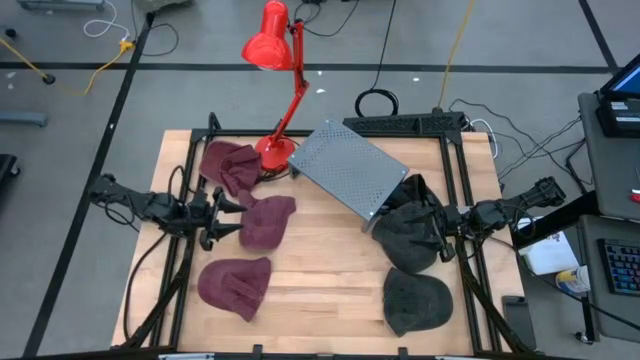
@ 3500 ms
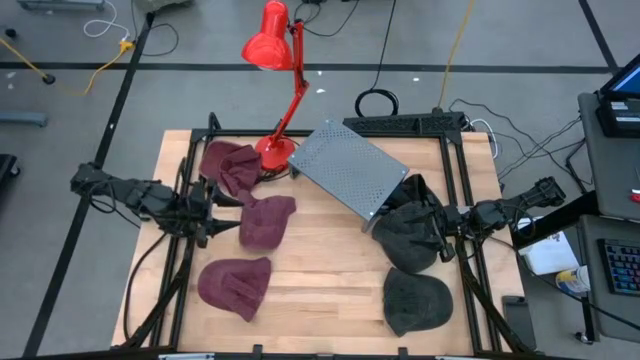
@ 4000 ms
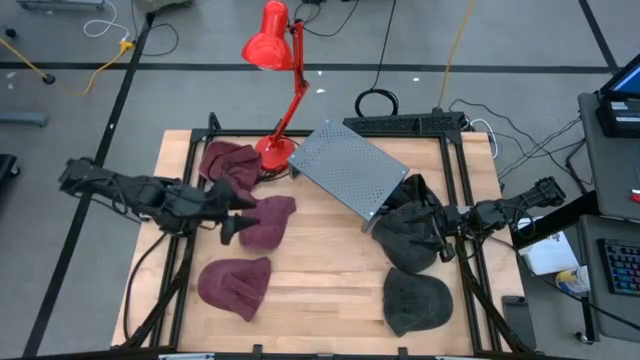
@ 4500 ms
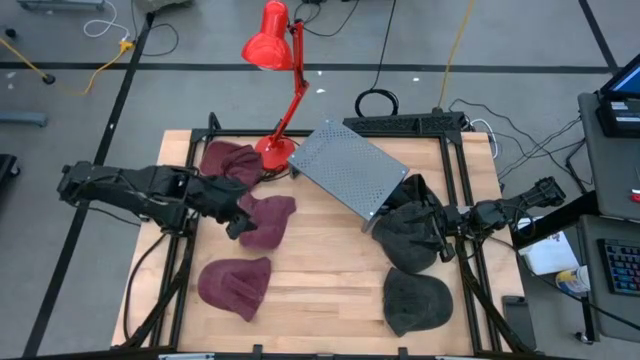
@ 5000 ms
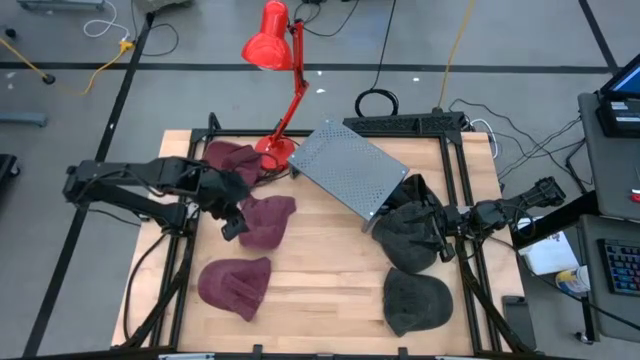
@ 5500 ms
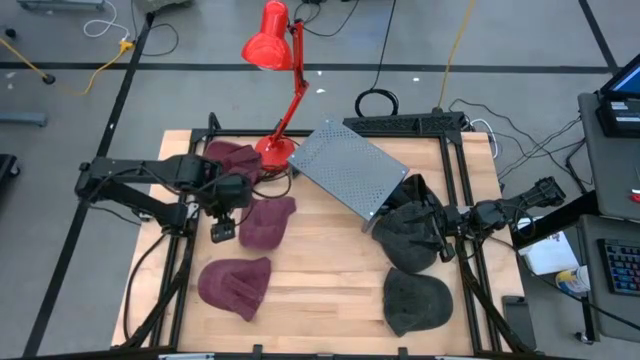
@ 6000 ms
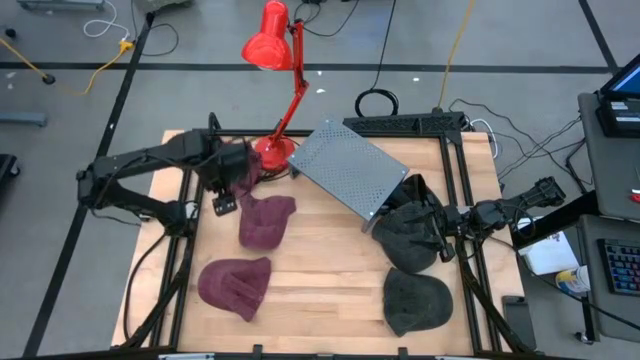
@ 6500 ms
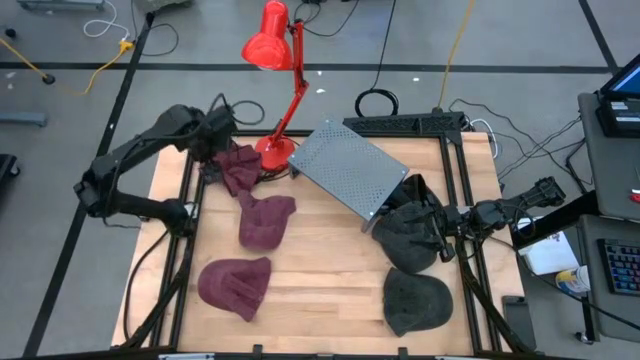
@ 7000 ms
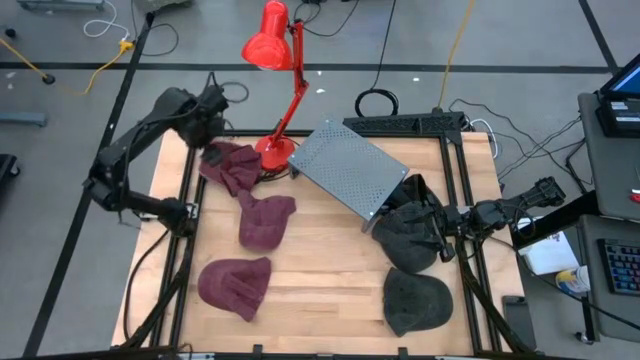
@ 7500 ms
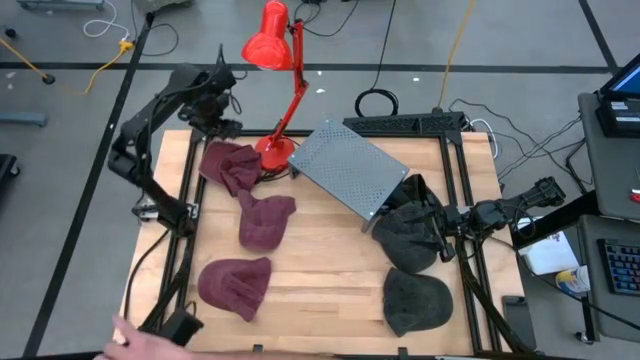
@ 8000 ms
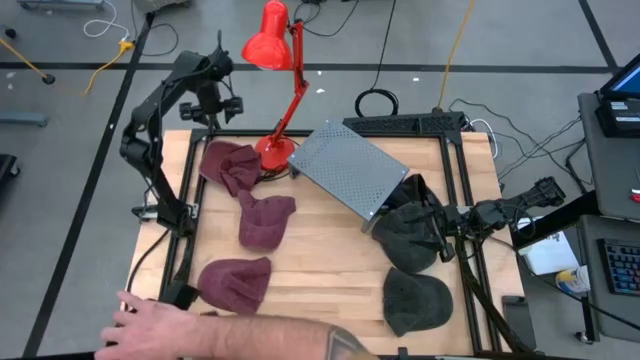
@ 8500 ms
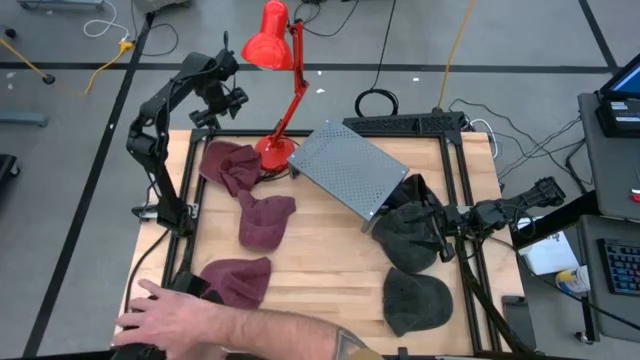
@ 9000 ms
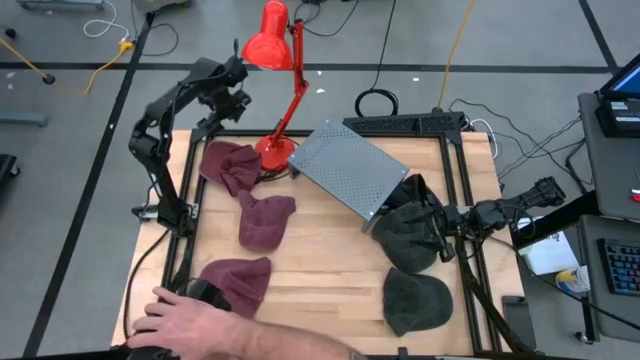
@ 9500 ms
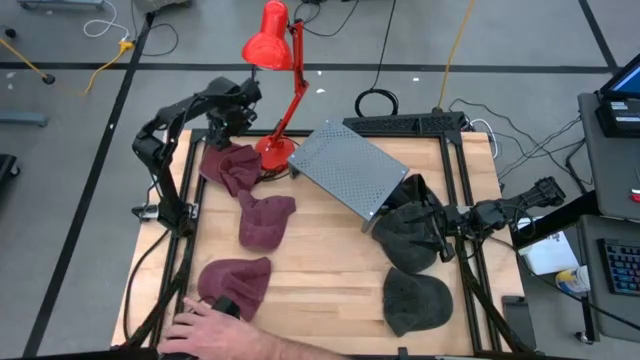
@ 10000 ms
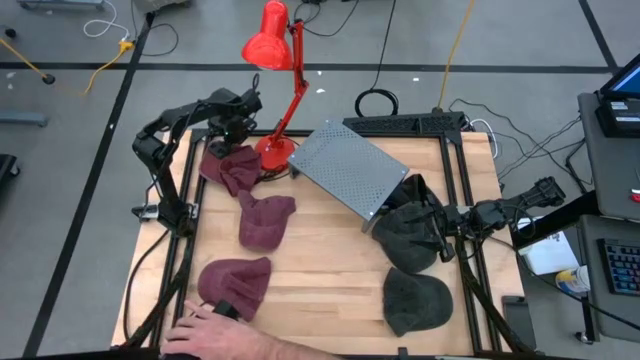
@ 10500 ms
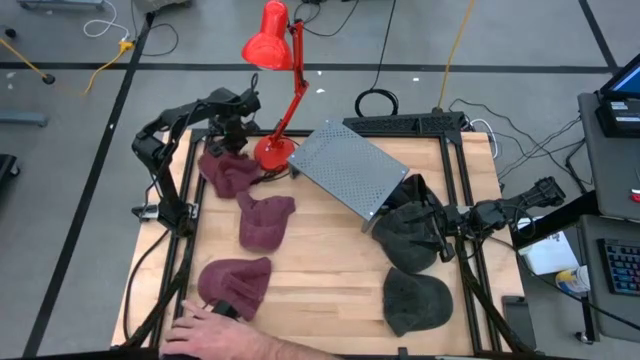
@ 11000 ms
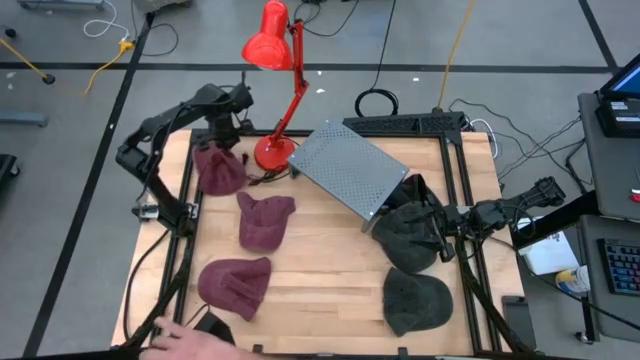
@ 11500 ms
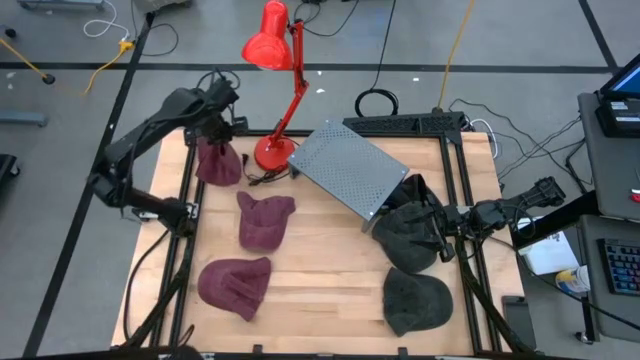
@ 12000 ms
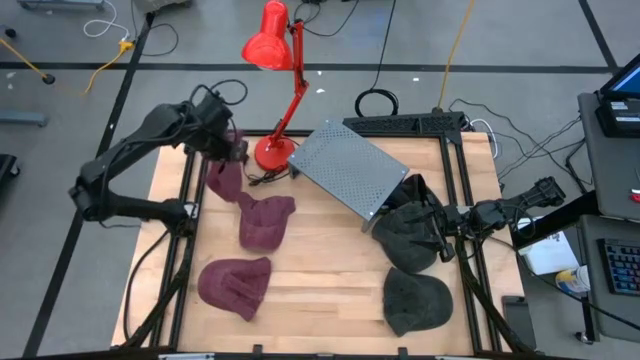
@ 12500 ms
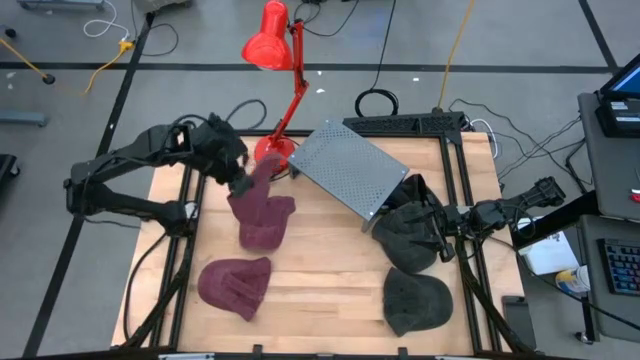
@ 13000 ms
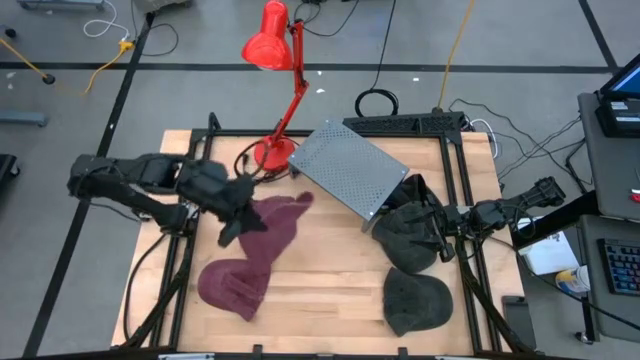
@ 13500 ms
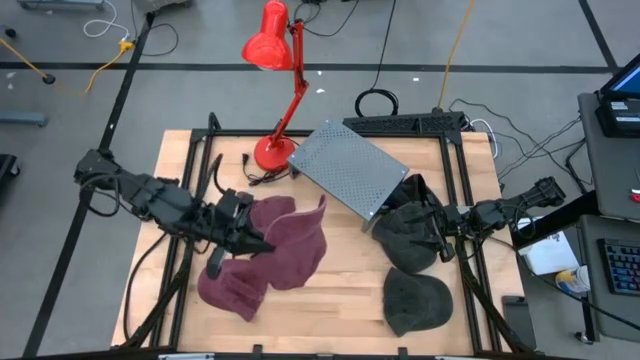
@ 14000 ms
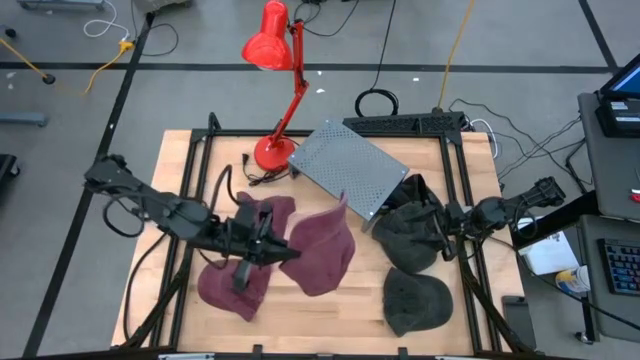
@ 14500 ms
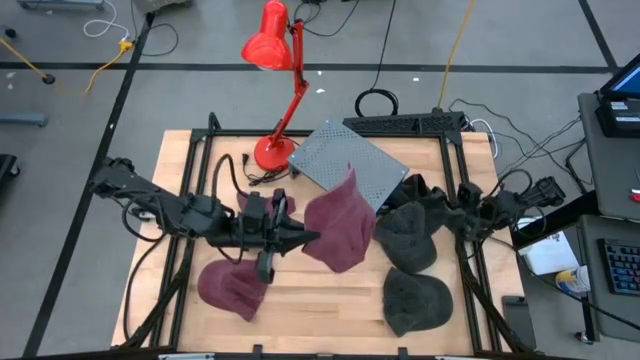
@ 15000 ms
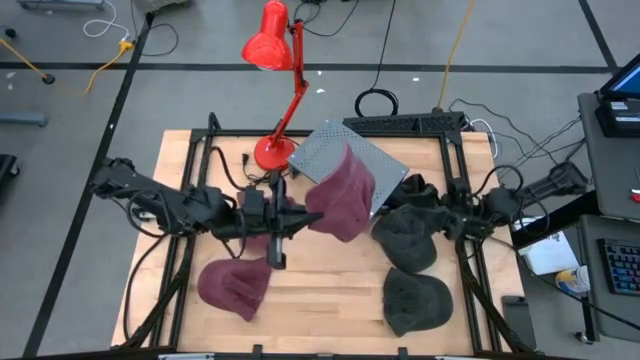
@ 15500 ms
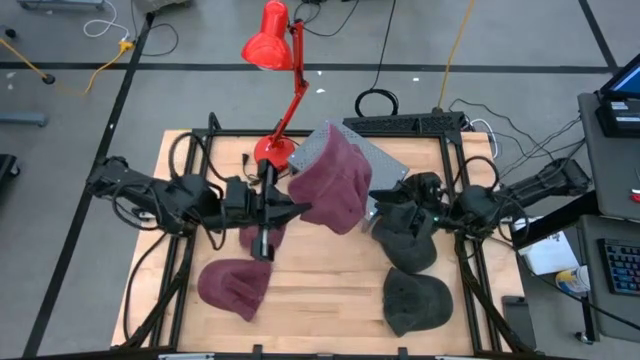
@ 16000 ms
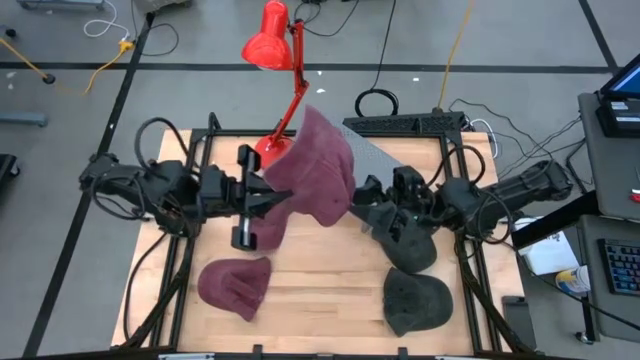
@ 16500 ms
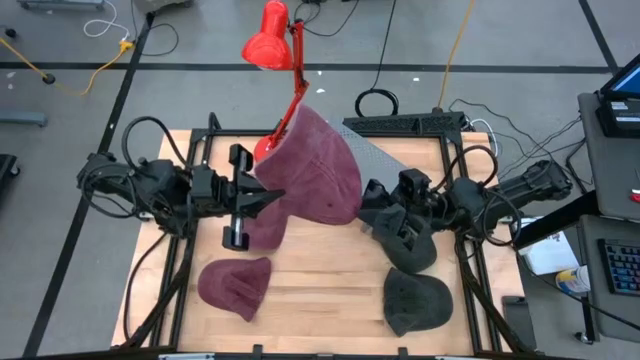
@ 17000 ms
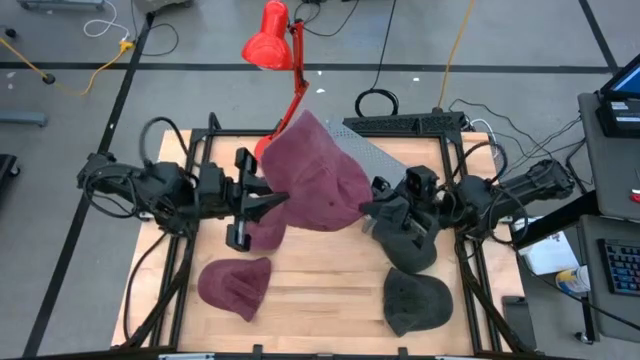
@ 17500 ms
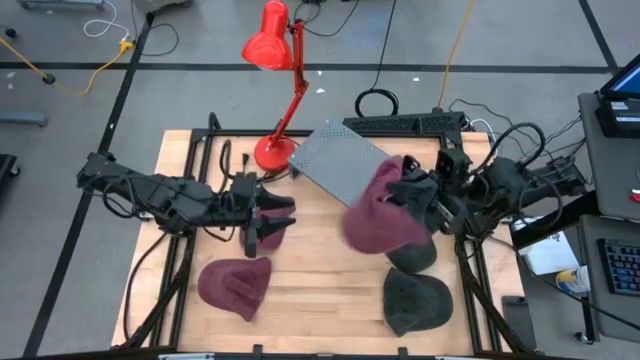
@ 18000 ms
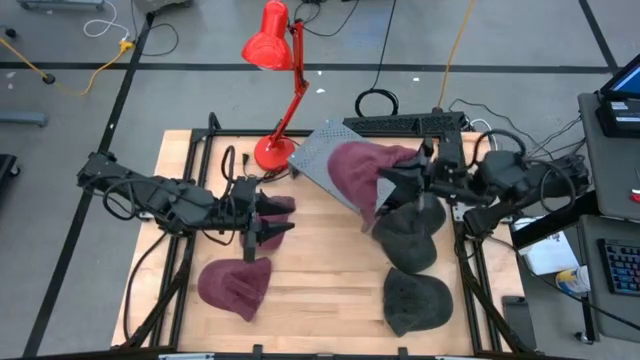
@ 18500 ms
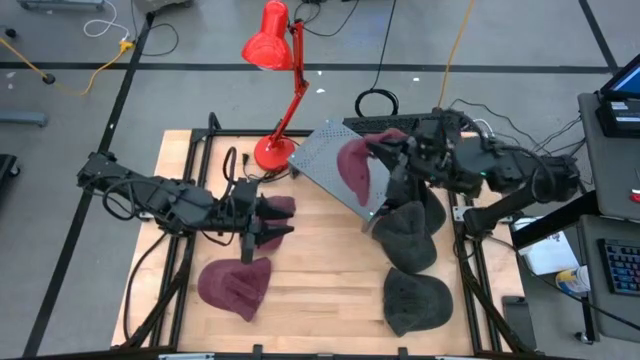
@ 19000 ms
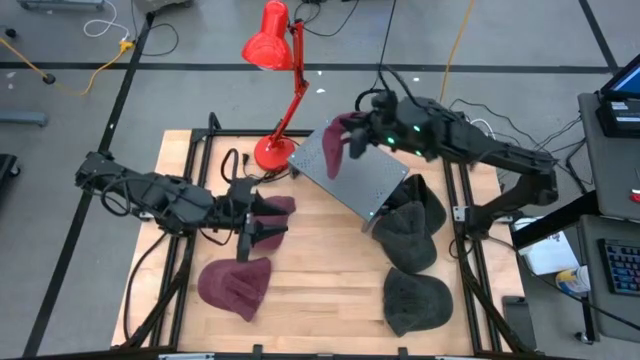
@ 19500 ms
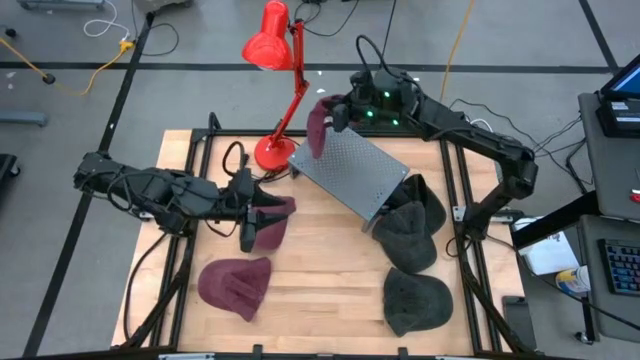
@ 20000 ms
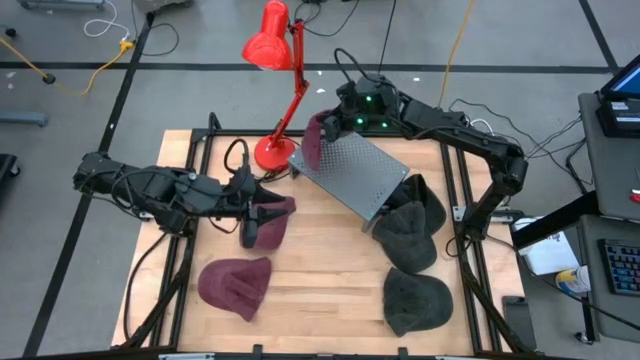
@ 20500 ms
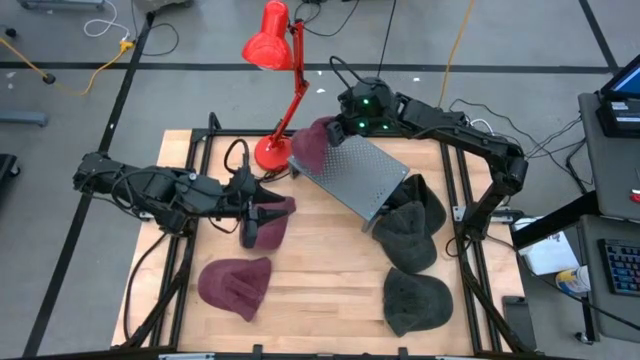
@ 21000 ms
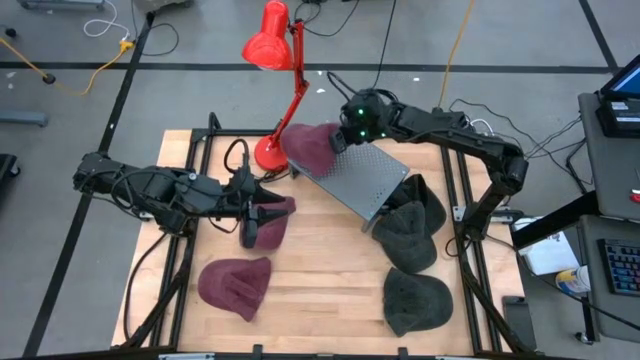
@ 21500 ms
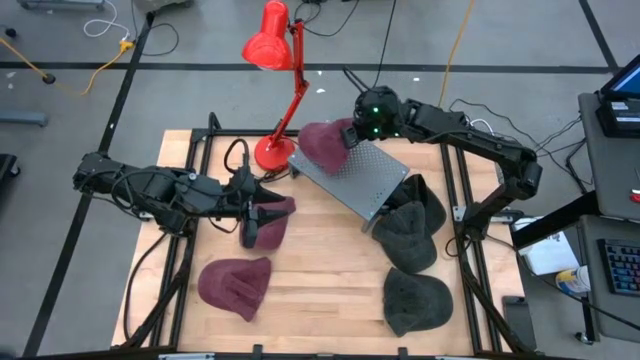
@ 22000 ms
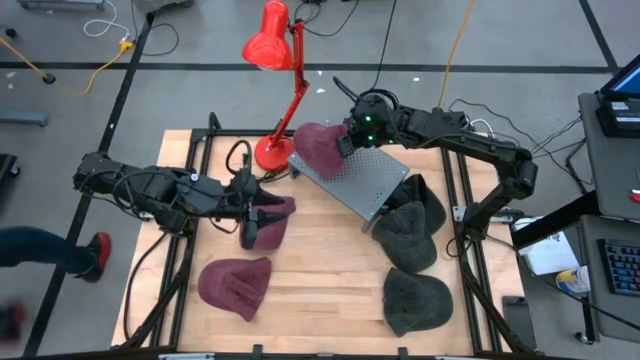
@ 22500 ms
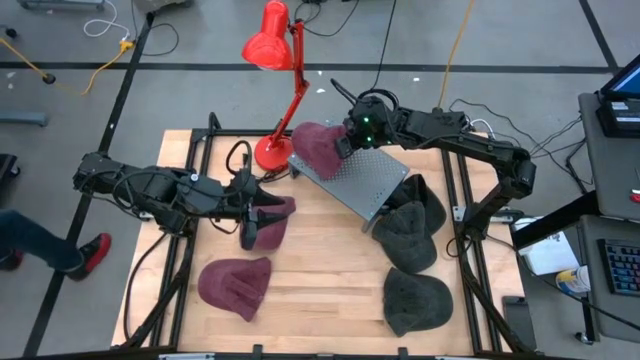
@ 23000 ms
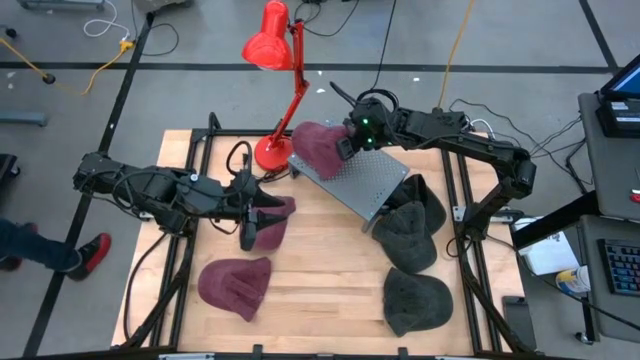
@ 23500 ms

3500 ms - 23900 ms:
Task: Pick & Place hat
Put the red cap on the shelf
